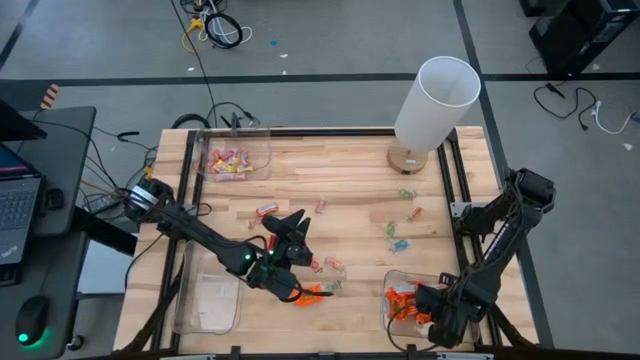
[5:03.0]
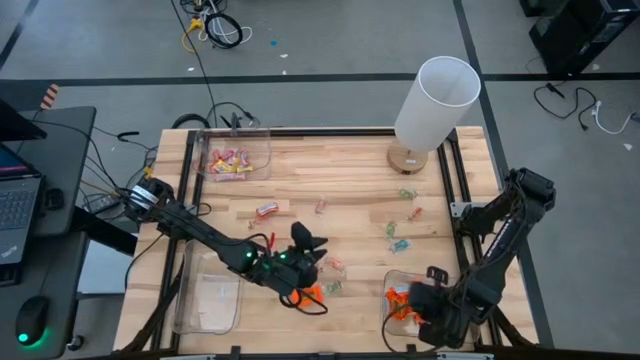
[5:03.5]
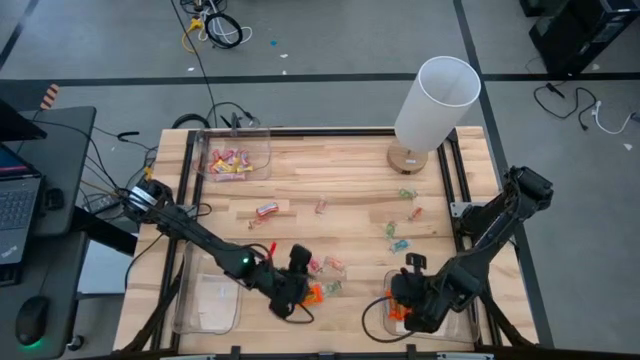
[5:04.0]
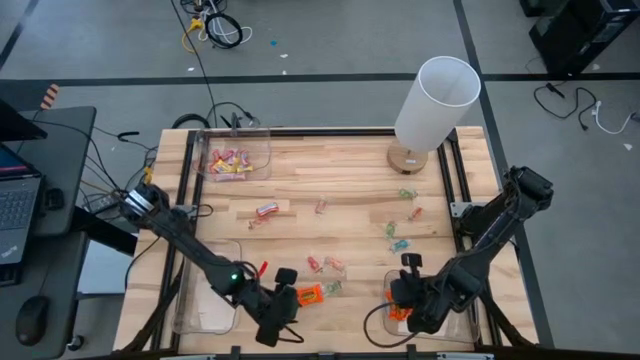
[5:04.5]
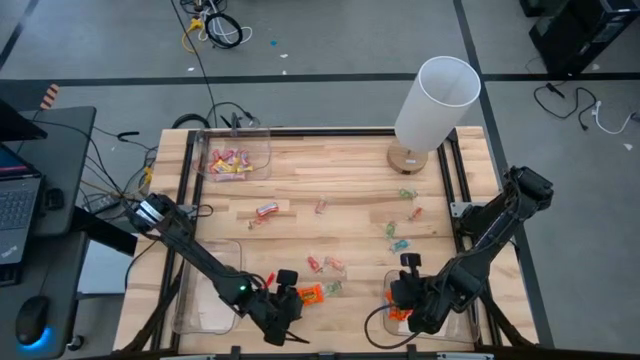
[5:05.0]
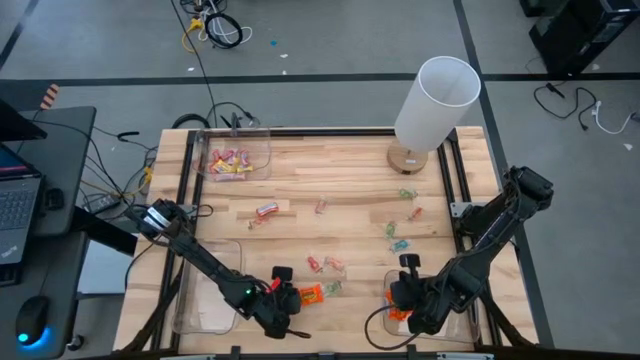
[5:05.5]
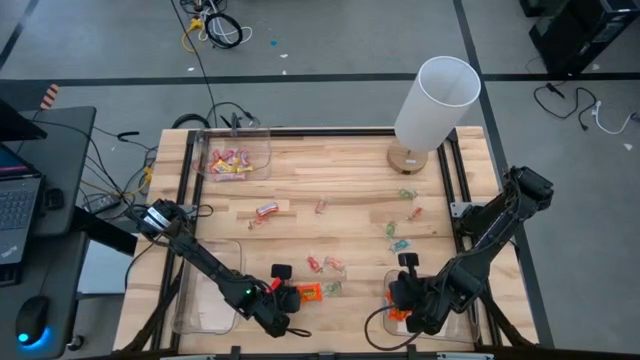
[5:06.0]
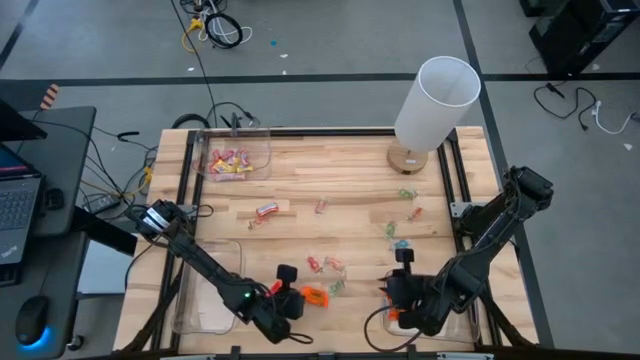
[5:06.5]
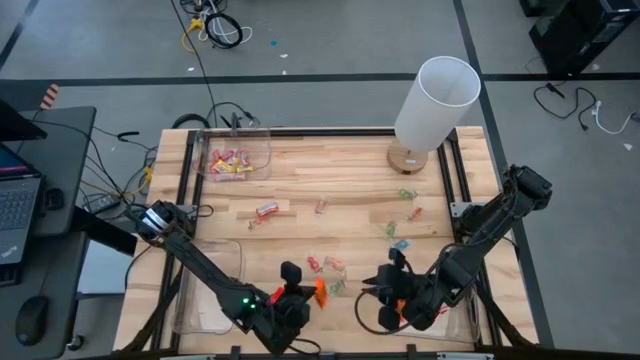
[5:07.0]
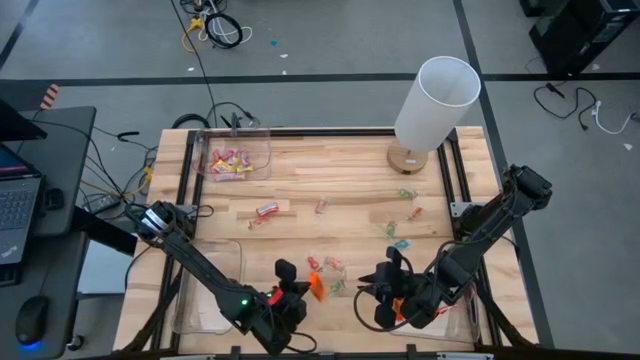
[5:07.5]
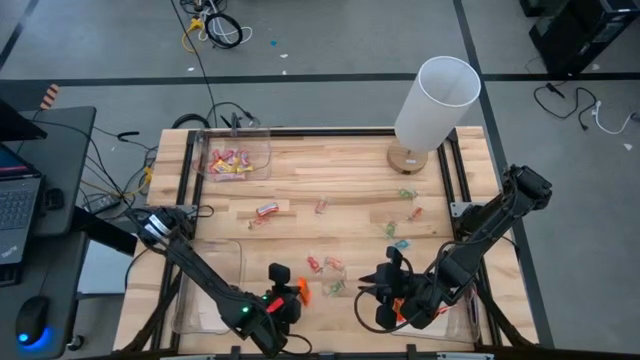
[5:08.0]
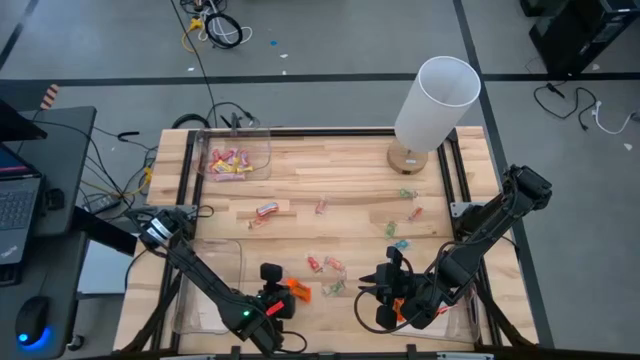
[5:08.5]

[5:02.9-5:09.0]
Task: Sort candy
Put the chocolate into the bottom right transparent bin

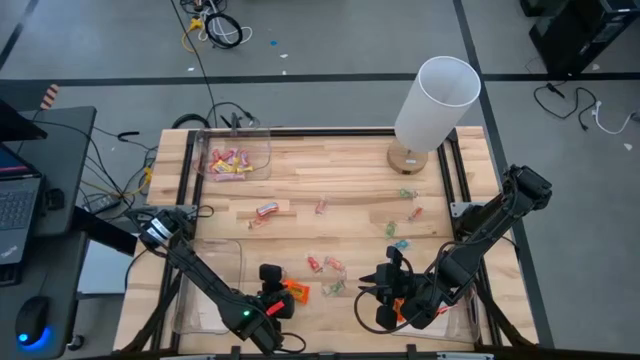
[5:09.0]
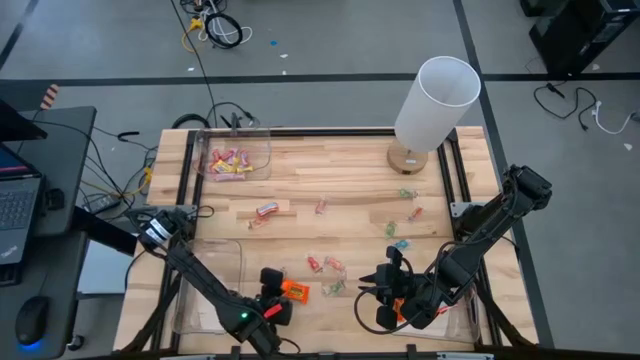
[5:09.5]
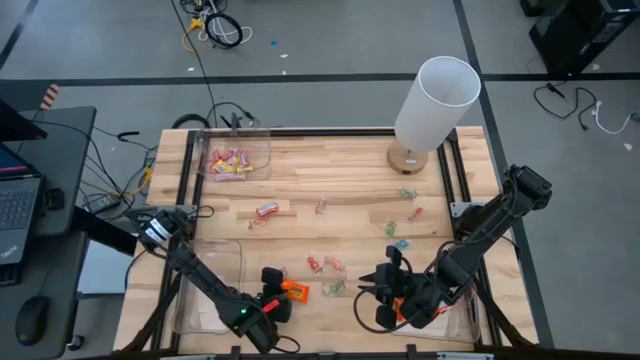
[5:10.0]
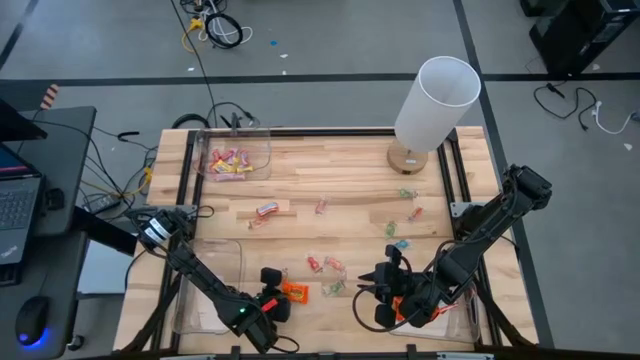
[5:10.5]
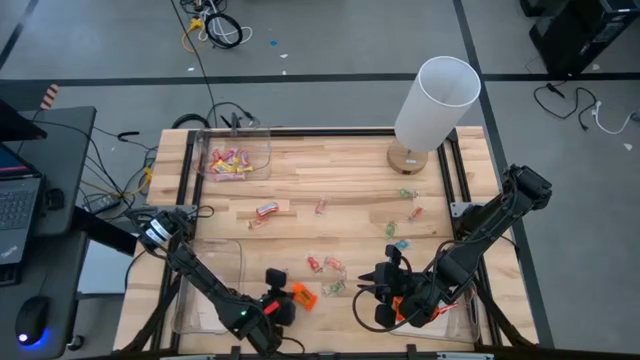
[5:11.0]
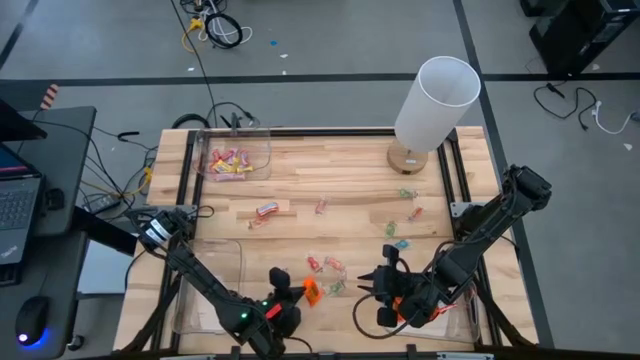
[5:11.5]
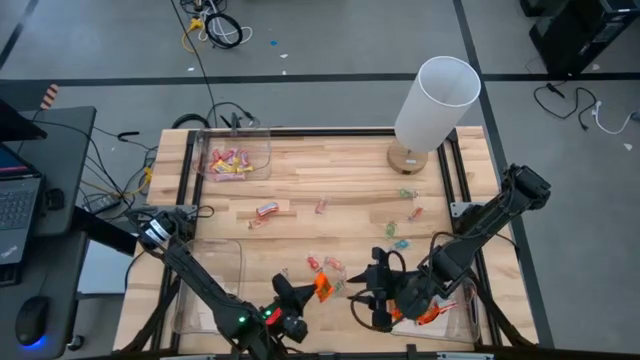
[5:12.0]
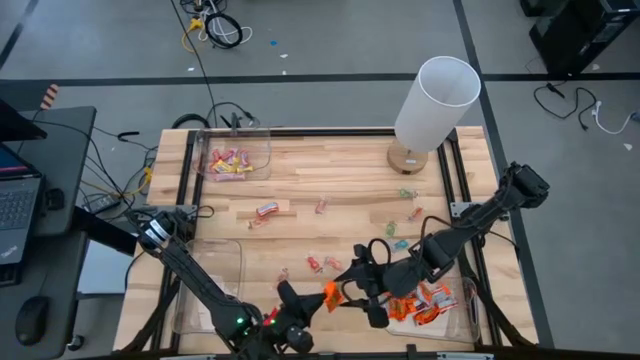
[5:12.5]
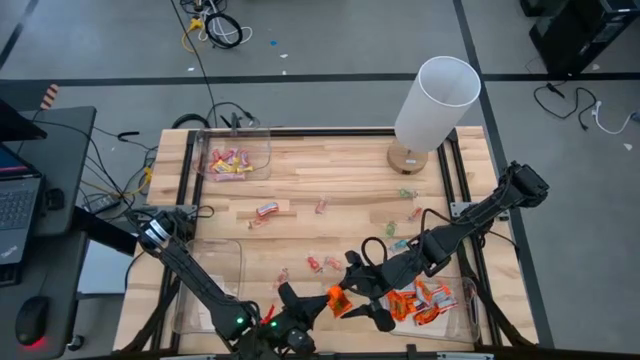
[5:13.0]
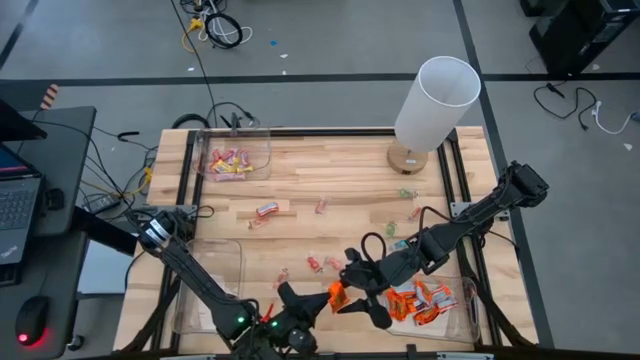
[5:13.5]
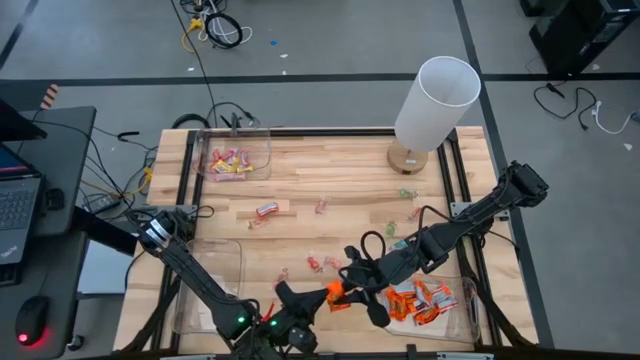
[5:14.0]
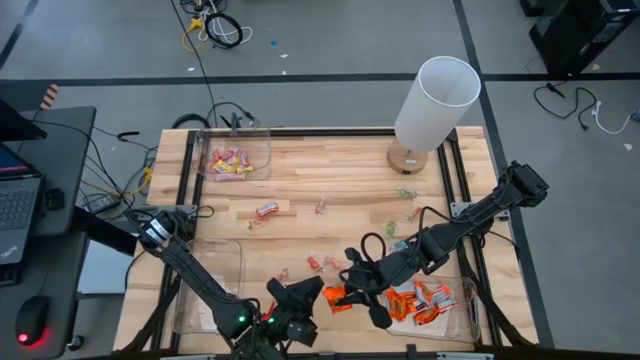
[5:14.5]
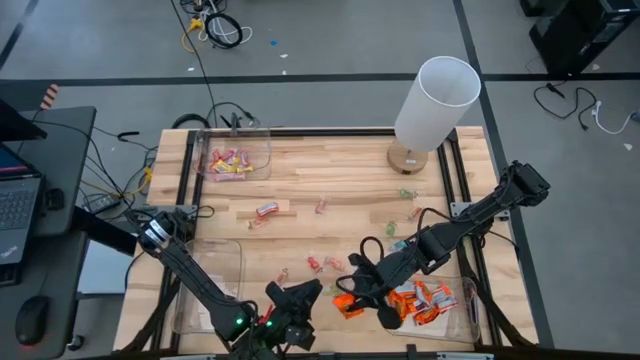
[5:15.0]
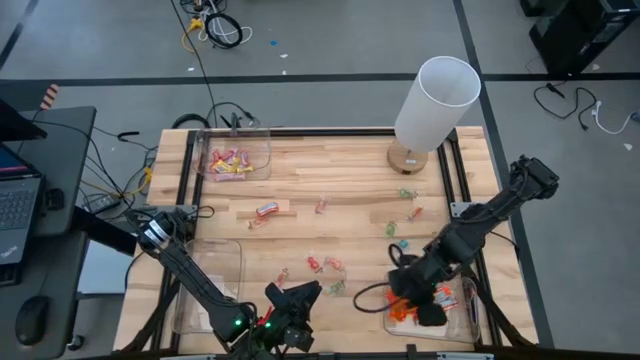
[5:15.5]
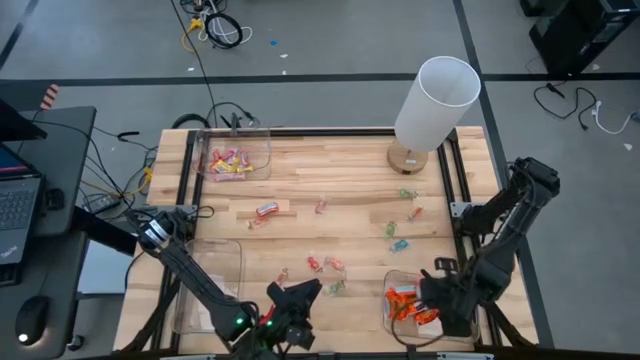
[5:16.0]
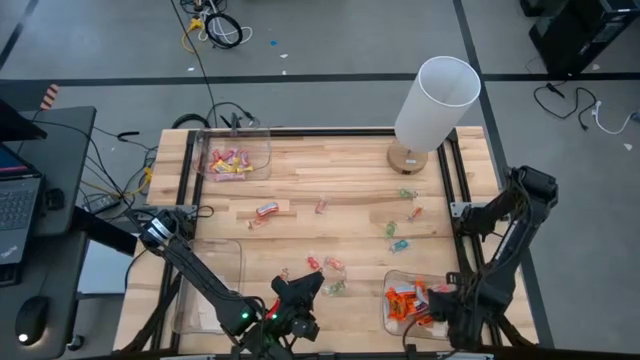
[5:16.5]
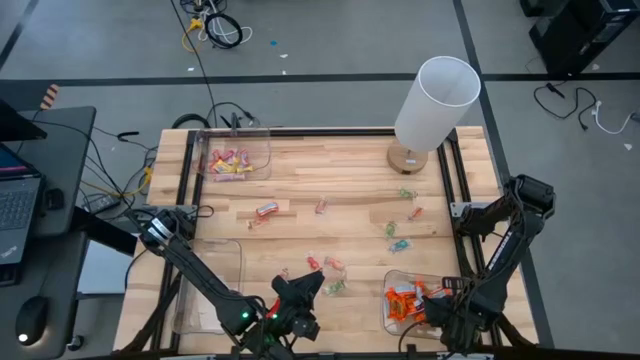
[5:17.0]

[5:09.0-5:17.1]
Put the chocolate into the bottom right transparent bin

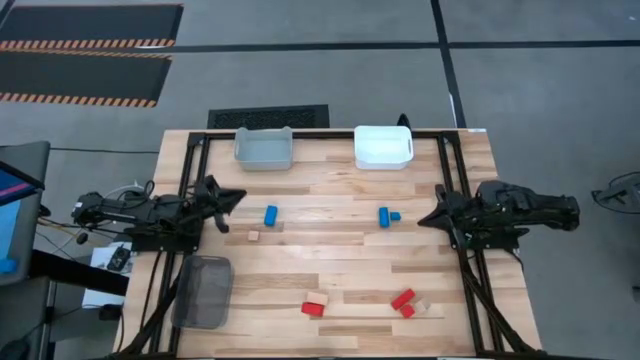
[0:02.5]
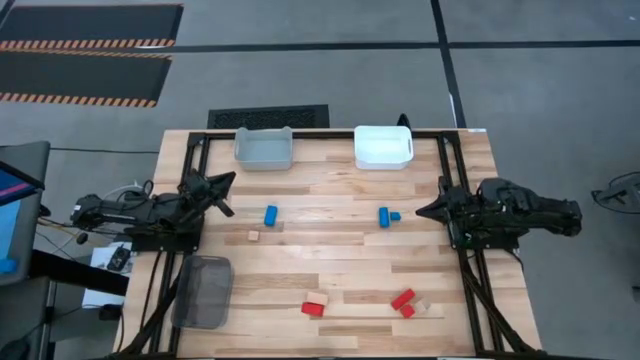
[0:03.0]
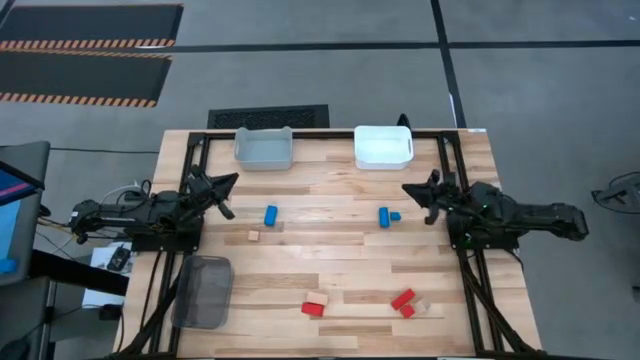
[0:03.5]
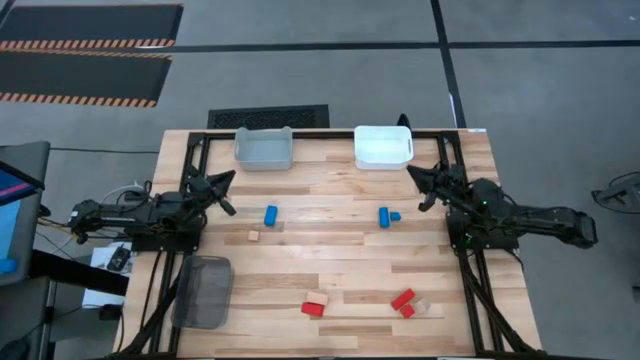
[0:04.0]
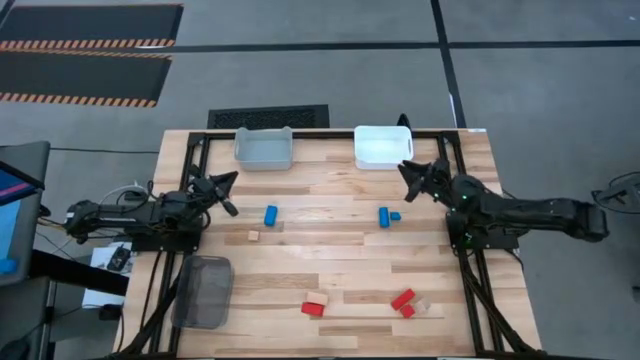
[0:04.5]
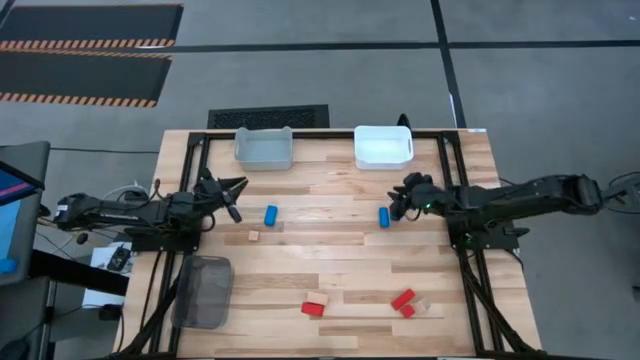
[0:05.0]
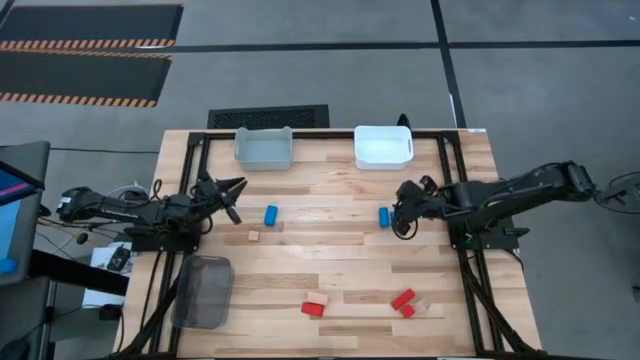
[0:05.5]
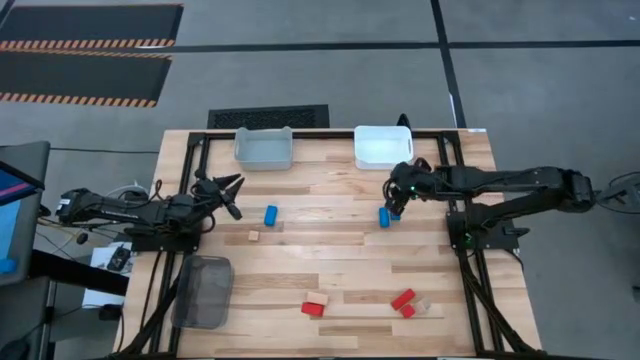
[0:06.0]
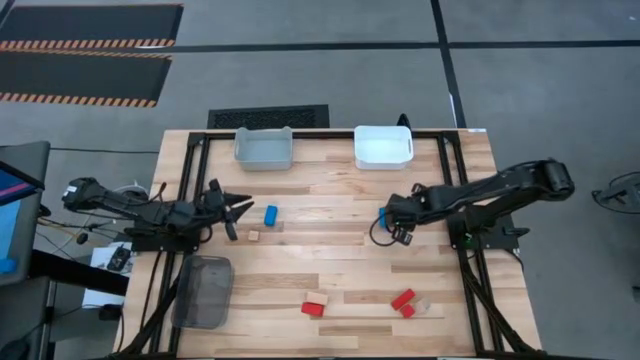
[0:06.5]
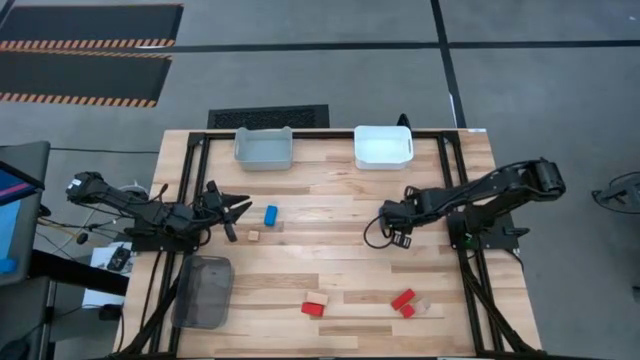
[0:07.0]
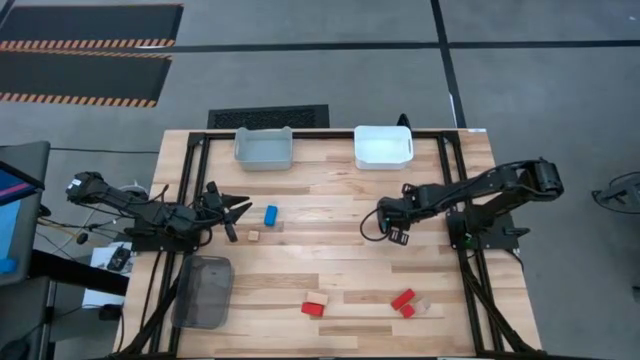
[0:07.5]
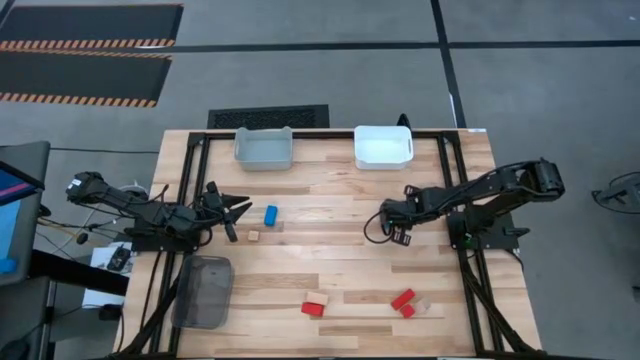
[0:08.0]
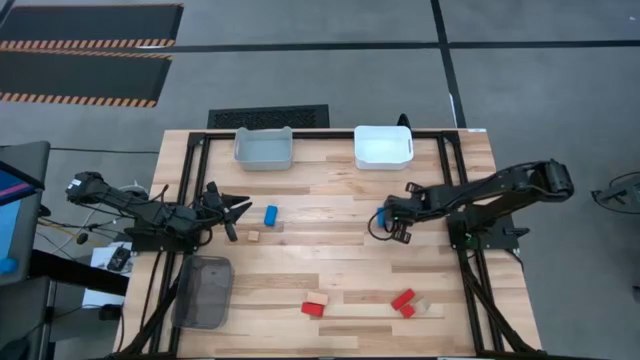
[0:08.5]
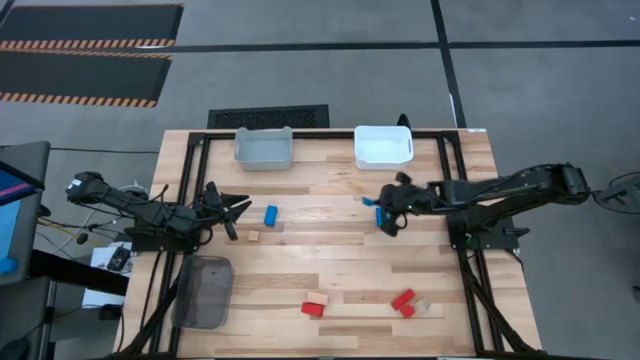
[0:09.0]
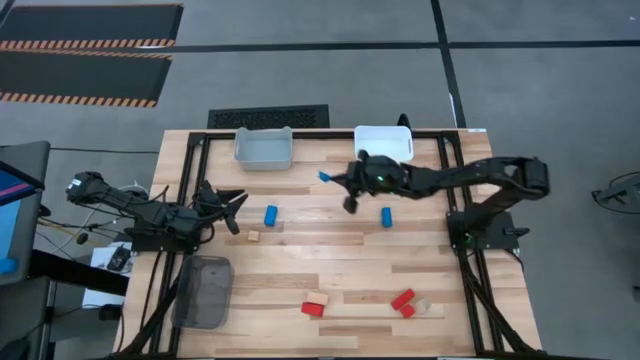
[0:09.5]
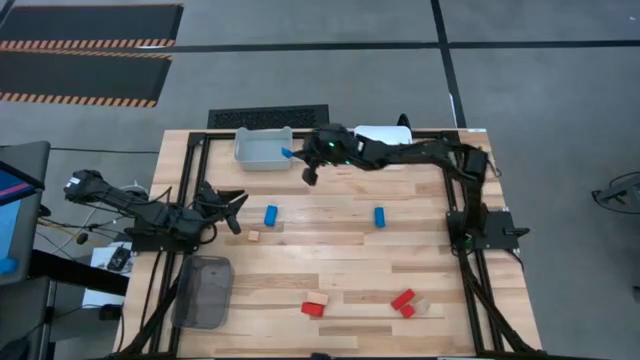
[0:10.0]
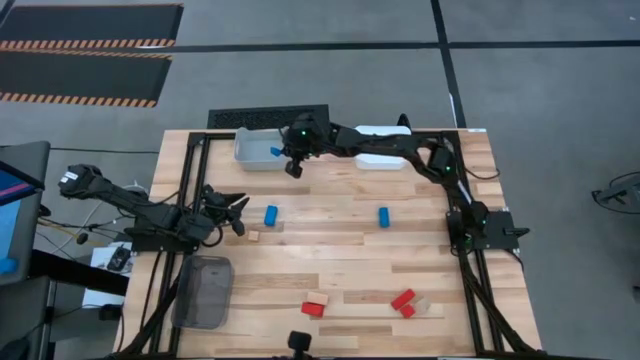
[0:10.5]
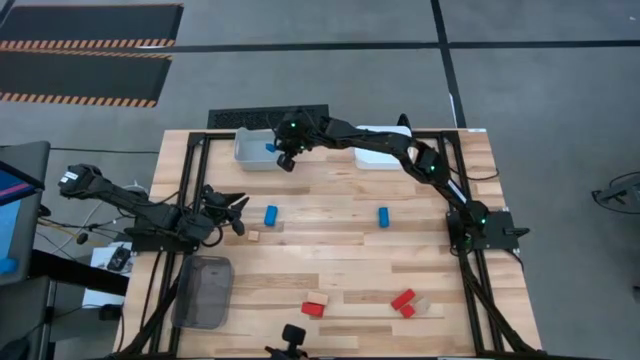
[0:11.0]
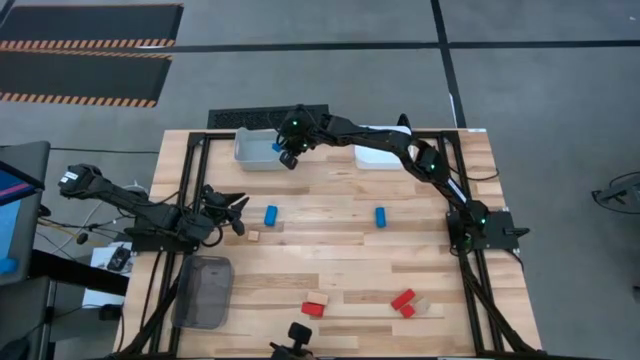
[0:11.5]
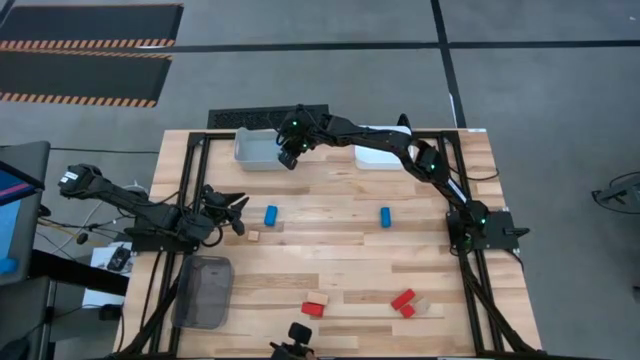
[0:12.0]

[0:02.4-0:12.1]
Task: Sort & place blocks by color
Put the blue triangle block into the gray bin
